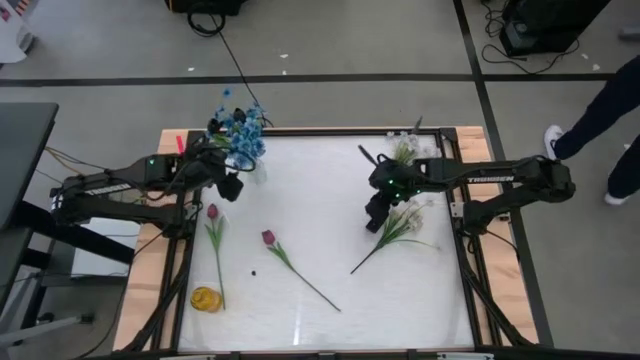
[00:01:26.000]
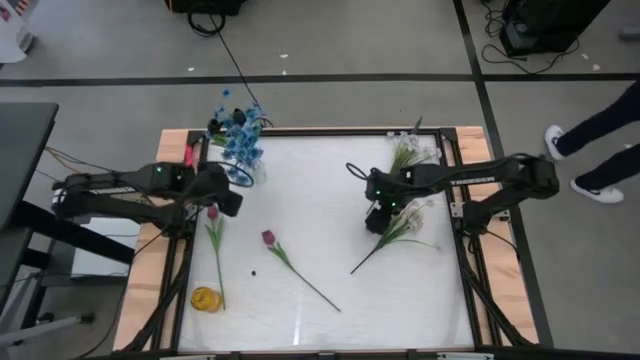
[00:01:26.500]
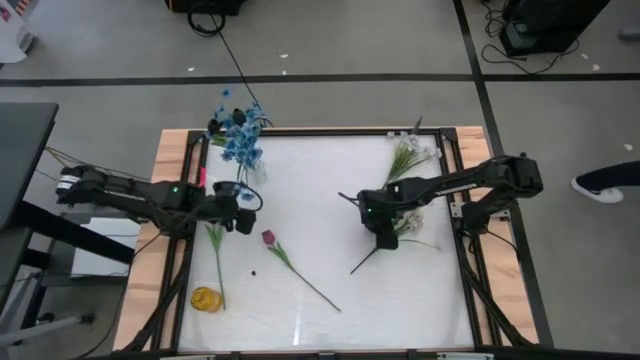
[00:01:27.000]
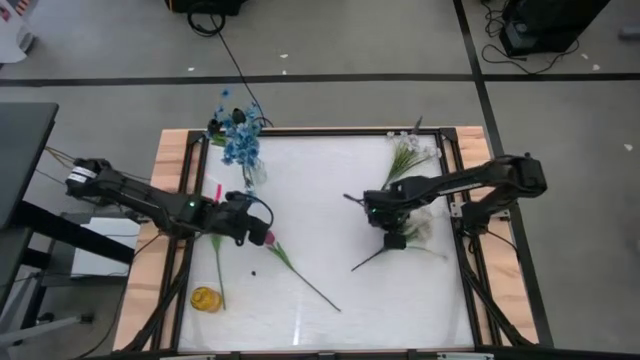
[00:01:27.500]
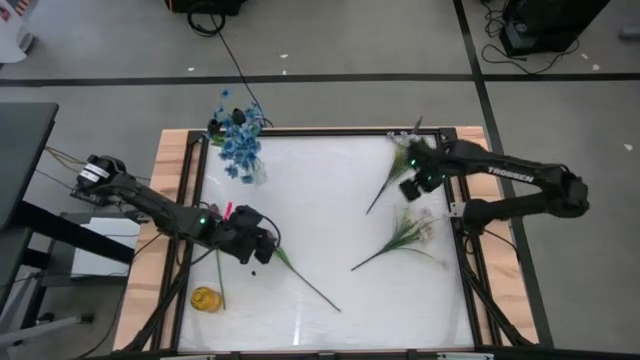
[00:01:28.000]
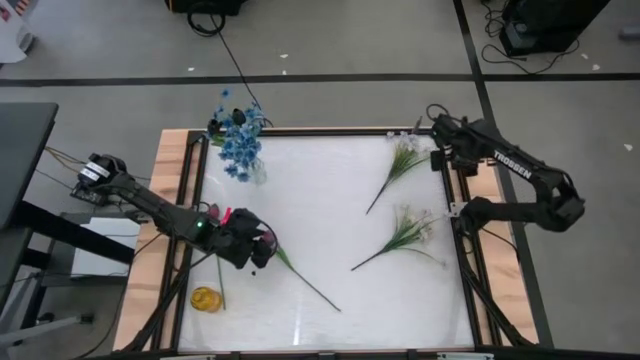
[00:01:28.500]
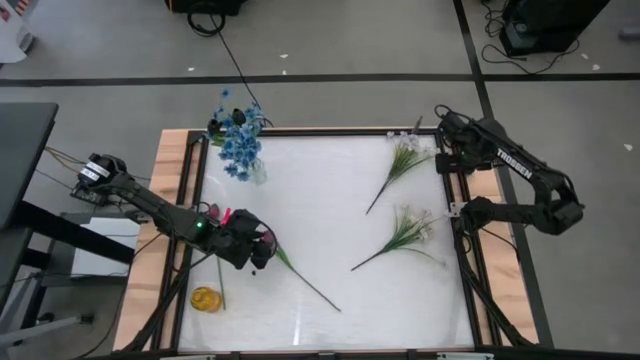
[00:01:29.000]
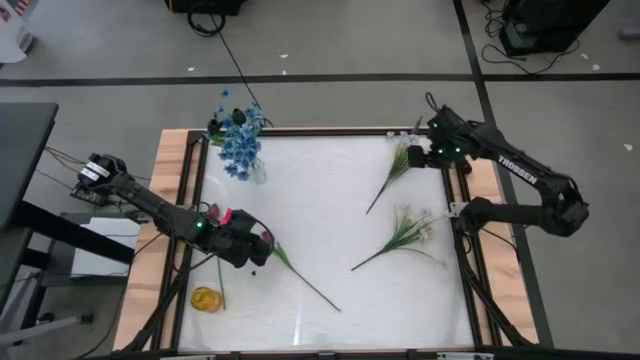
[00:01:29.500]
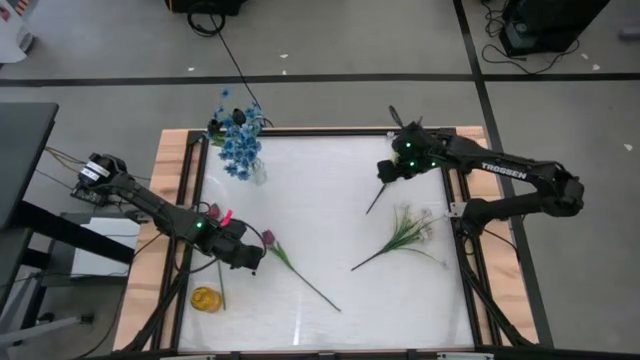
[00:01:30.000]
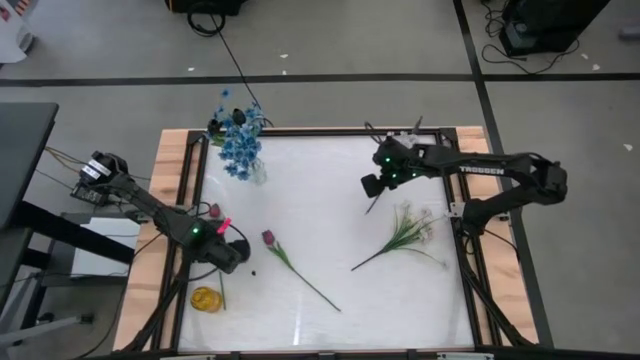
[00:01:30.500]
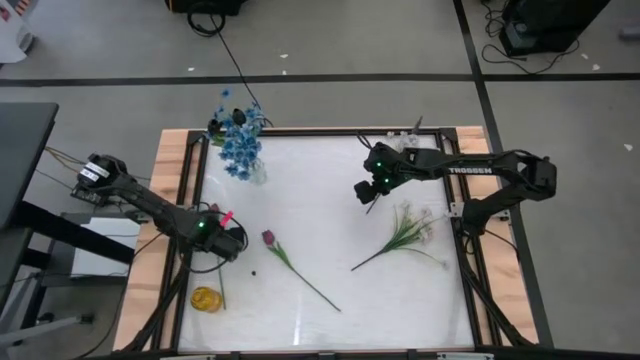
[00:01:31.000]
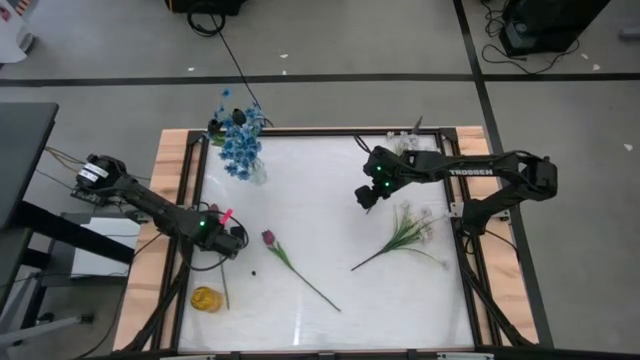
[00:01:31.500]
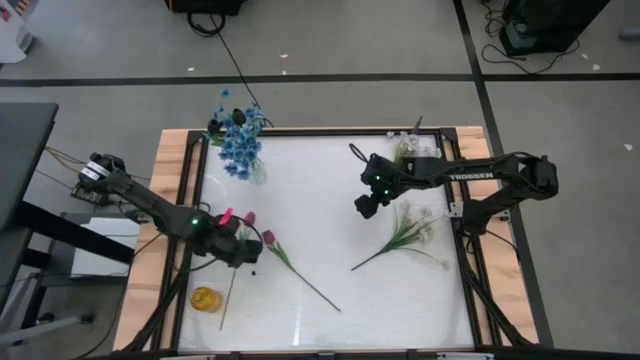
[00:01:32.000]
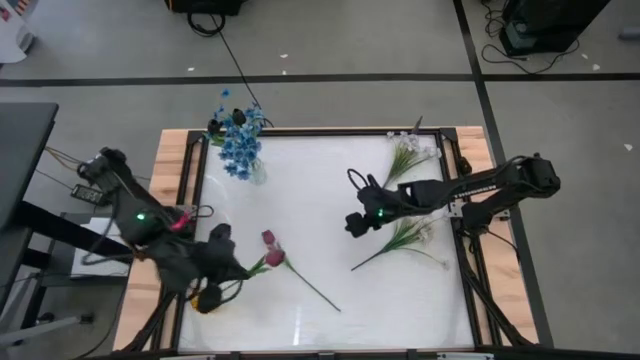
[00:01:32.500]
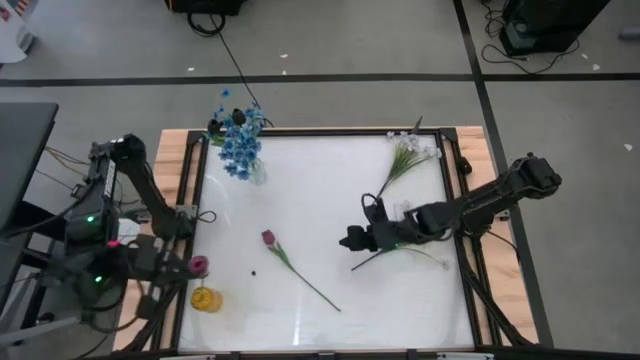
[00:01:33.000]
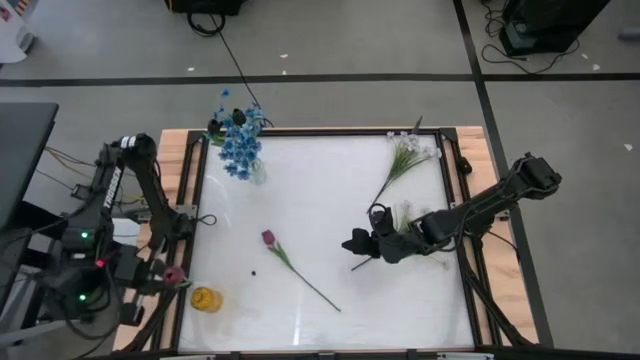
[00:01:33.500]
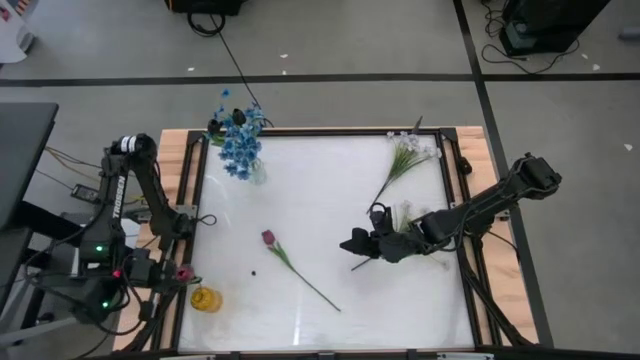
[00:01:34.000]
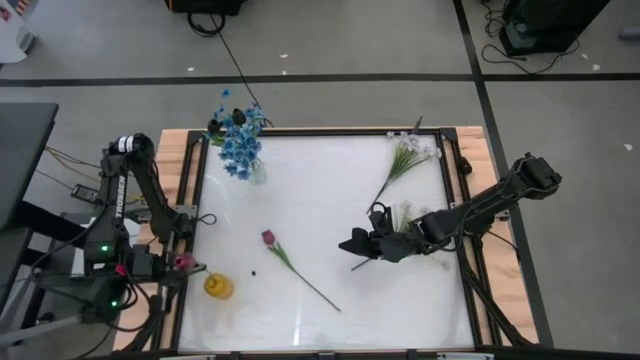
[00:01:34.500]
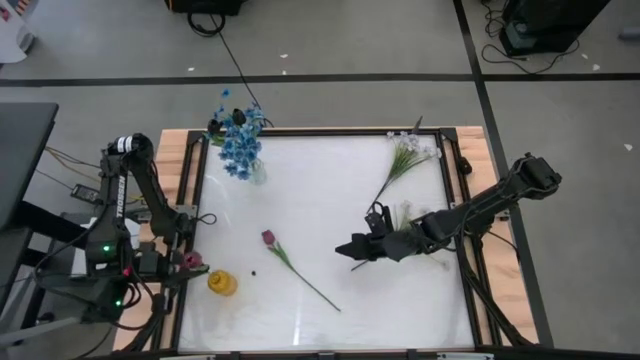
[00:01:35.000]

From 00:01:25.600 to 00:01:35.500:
Task: Sort flowers into vase by color
Put the left red tulip into the yellow vase

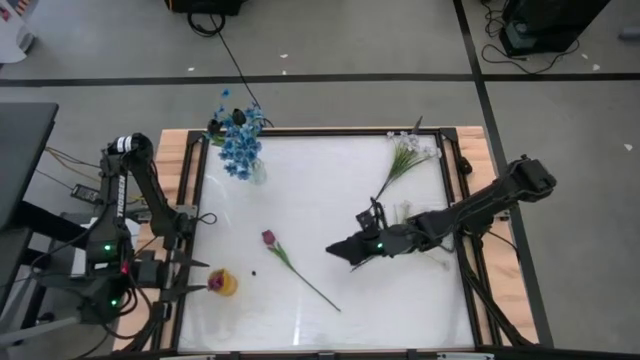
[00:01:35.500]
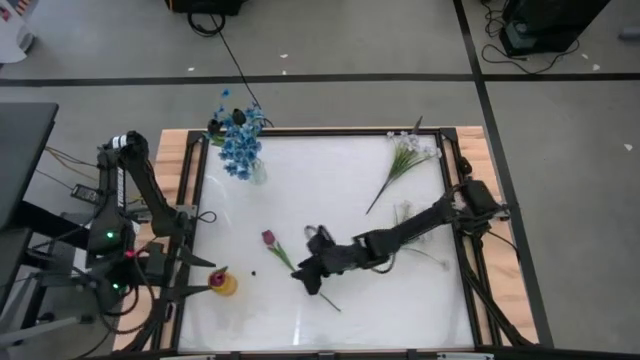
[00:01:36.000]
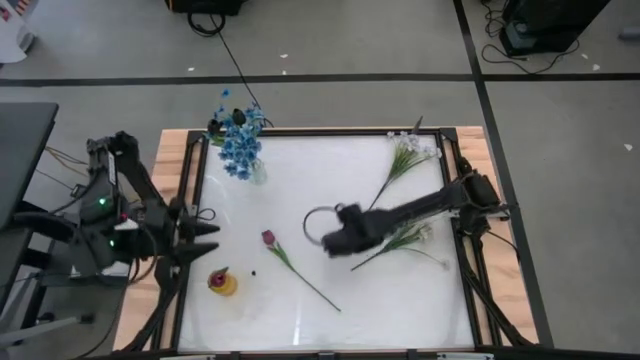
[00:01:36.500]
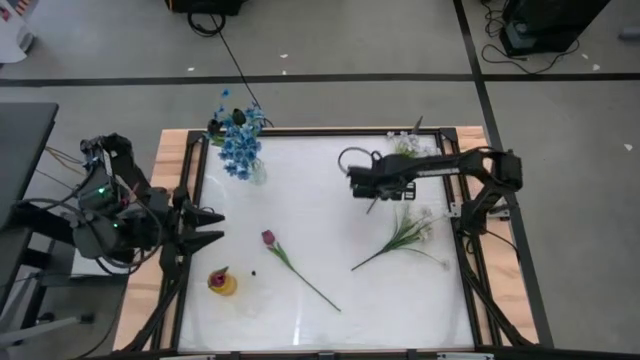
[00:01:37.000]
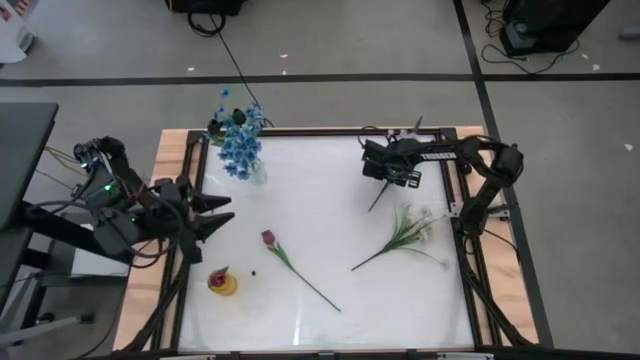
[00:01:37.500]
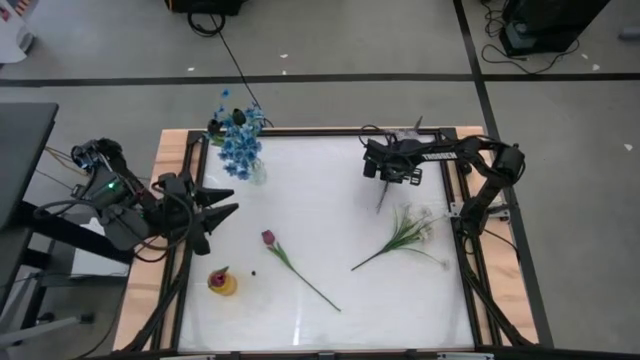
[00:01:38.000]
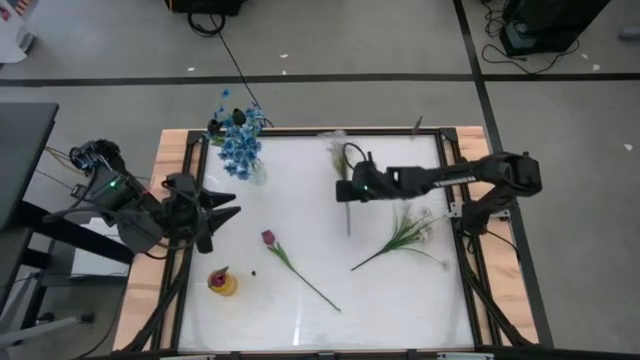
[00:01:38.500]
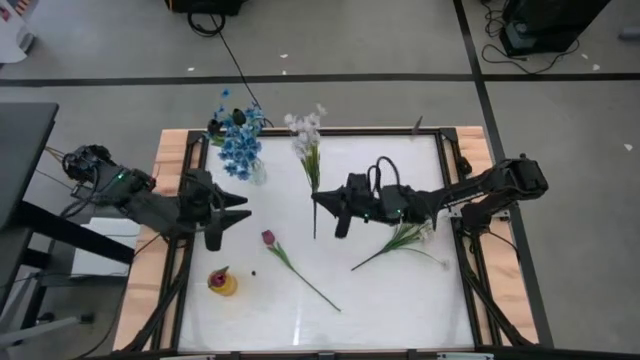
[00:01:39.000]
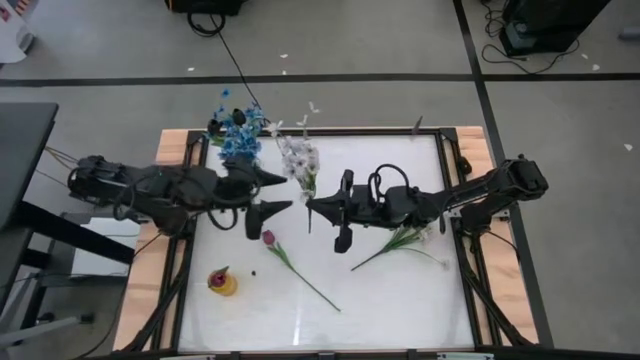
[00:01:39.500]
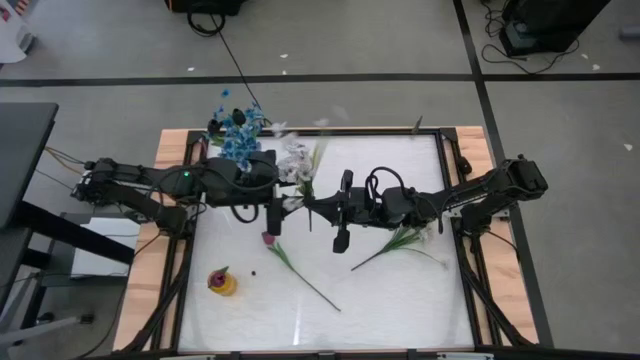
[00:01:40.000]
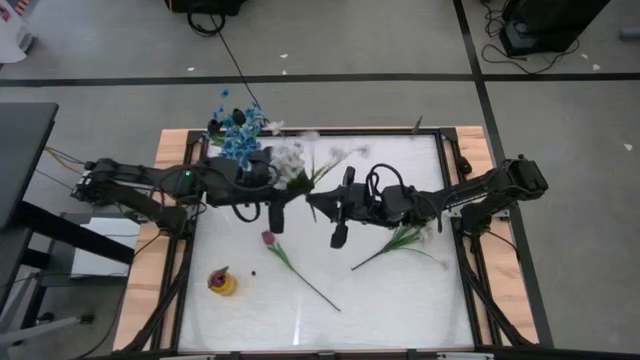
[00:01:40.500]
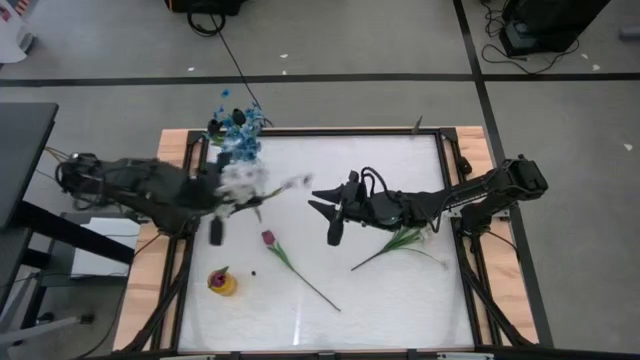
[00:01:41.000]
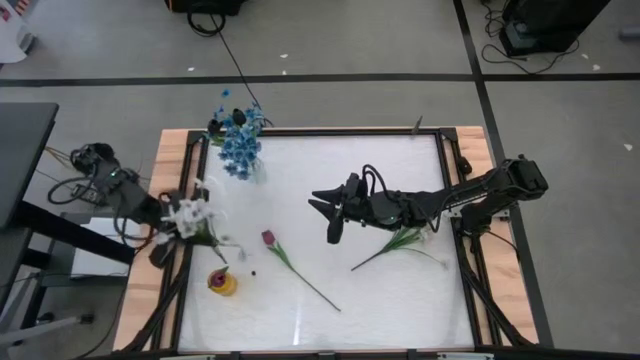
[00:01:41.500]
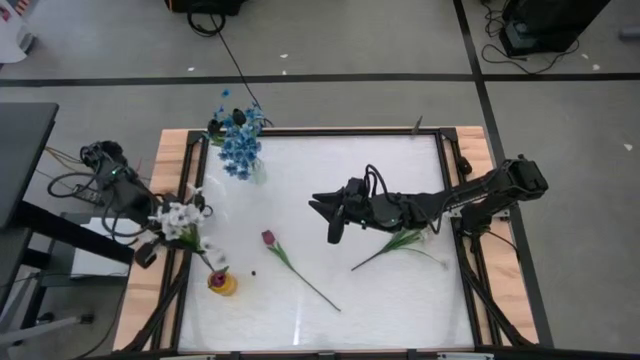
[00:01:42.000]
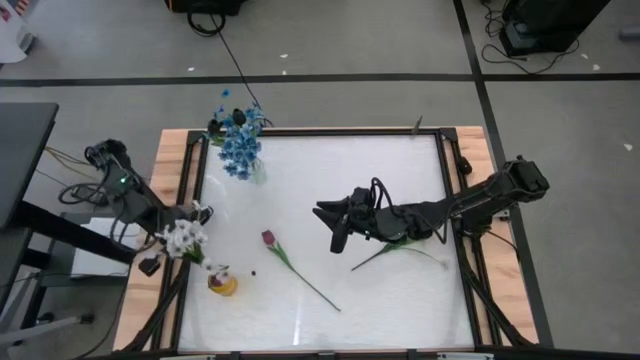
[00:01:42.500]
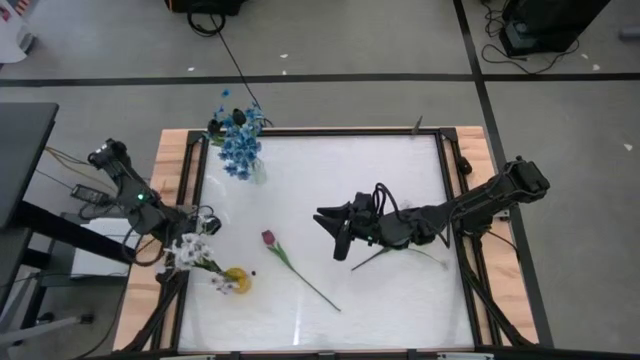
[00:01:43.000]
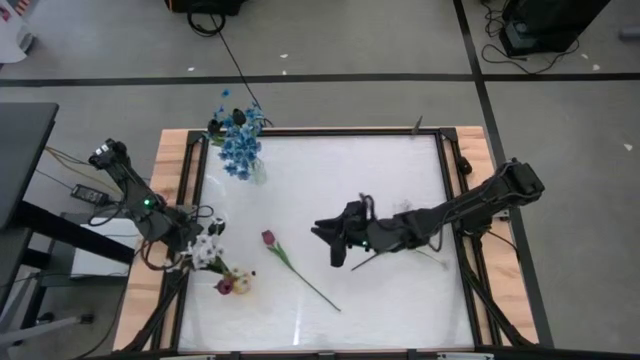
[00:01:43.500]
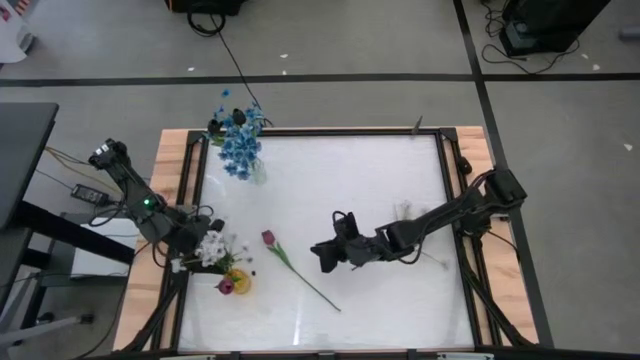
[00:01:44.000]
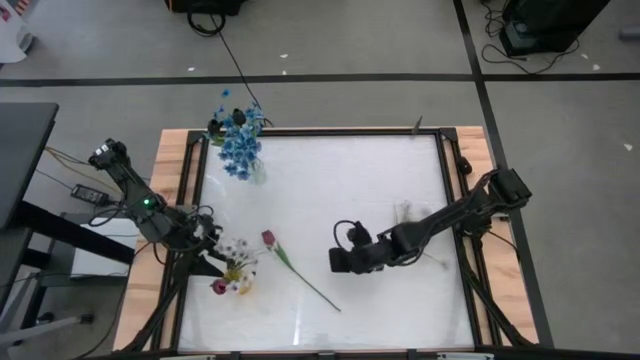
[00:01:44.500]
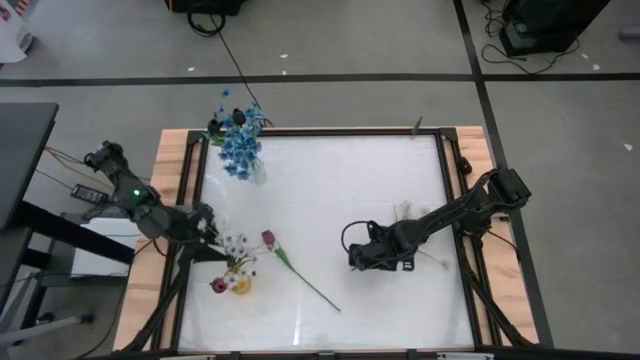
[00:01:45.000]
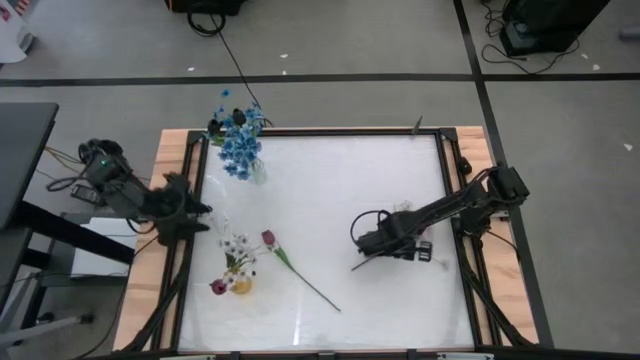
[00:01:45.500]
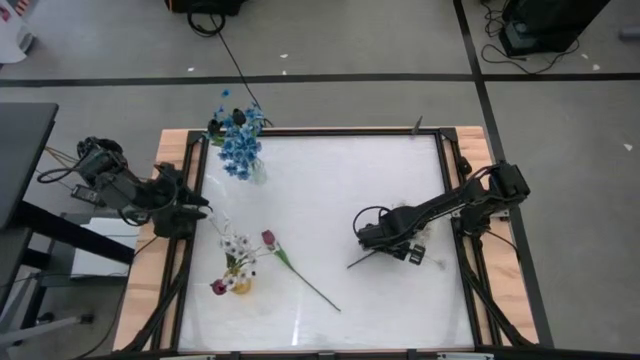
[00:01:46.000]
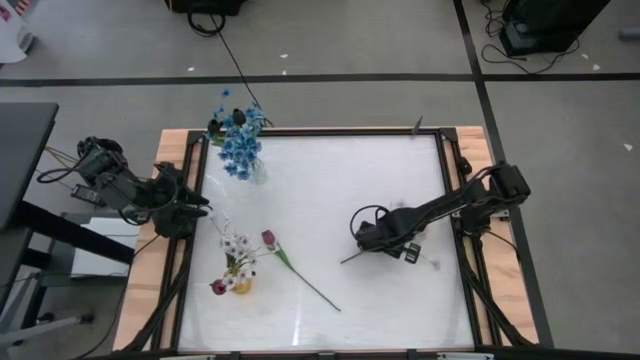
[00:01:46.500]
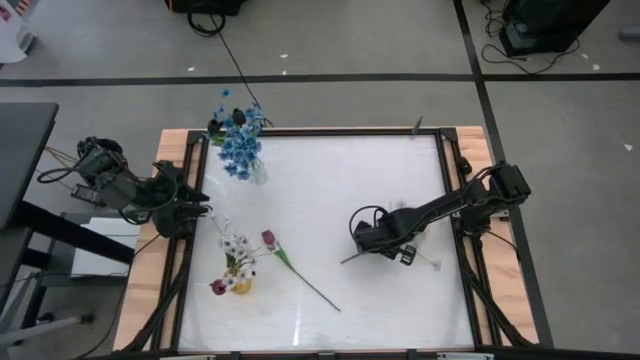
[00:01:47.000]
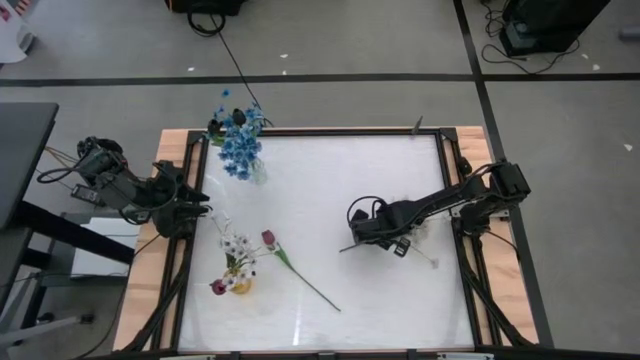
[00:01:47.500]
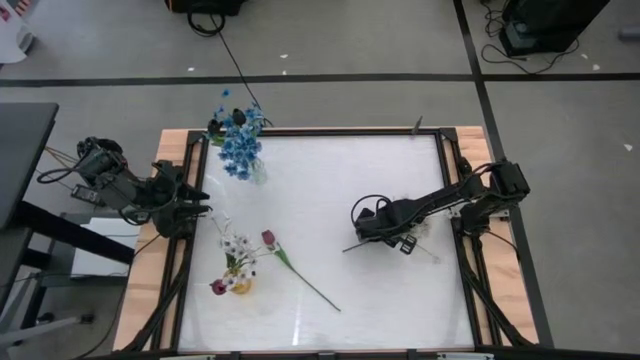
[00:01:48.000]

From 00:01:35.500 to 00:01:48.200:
Put the top white flowers in the yellow vase
